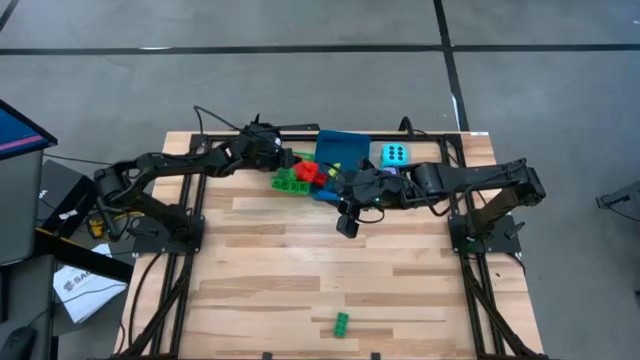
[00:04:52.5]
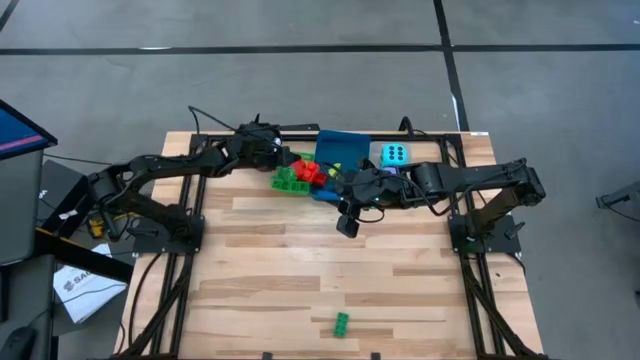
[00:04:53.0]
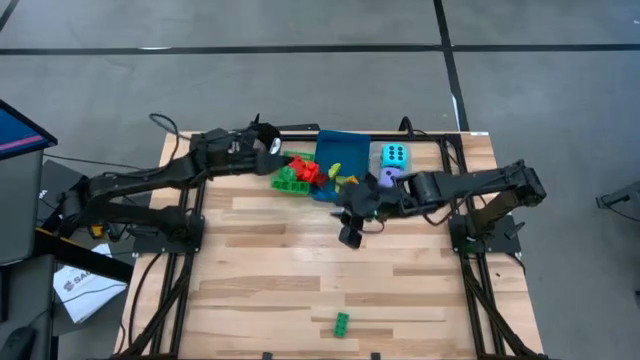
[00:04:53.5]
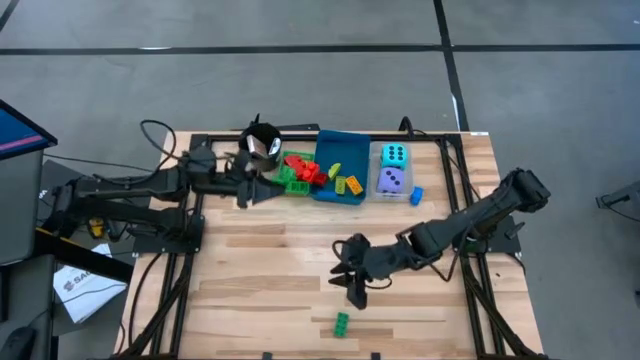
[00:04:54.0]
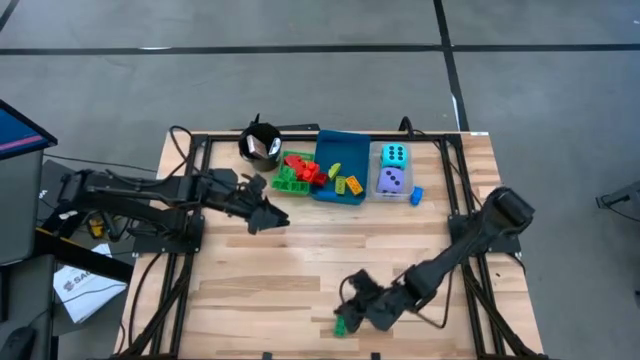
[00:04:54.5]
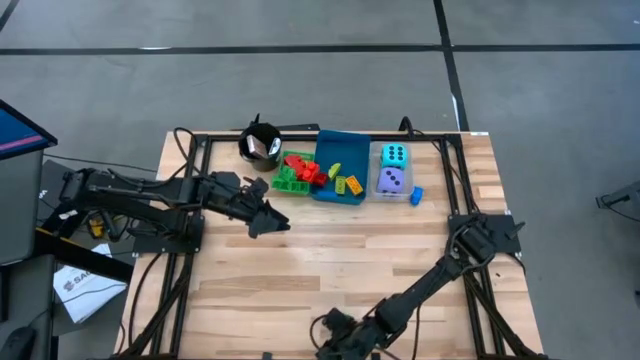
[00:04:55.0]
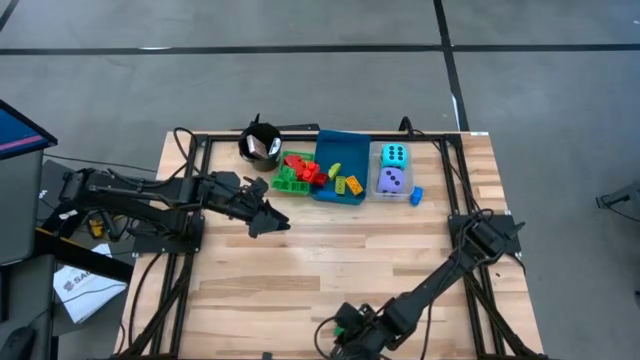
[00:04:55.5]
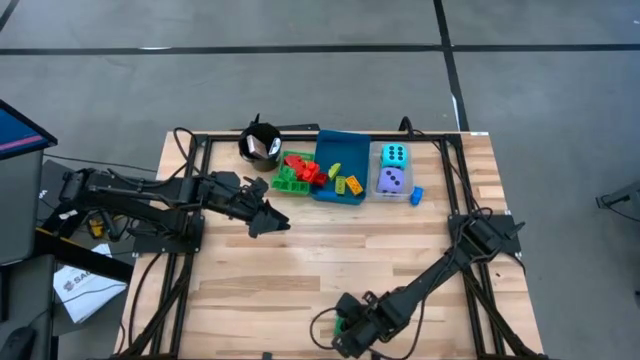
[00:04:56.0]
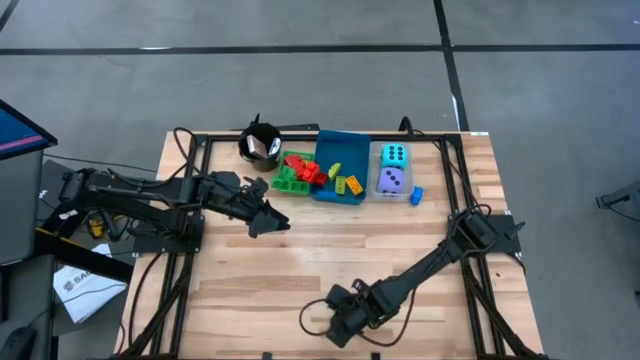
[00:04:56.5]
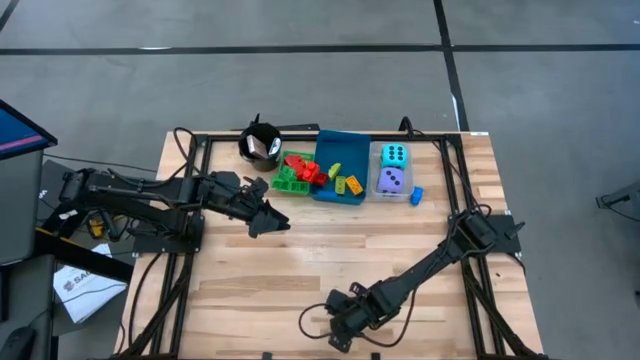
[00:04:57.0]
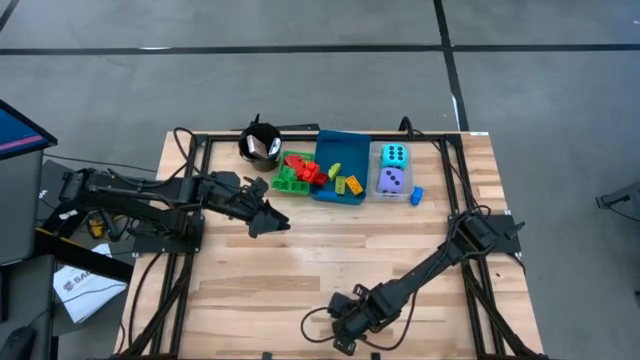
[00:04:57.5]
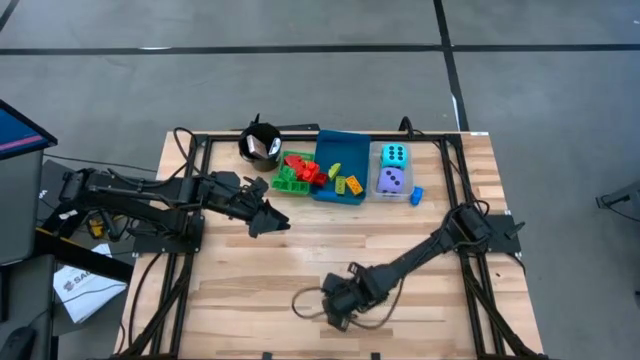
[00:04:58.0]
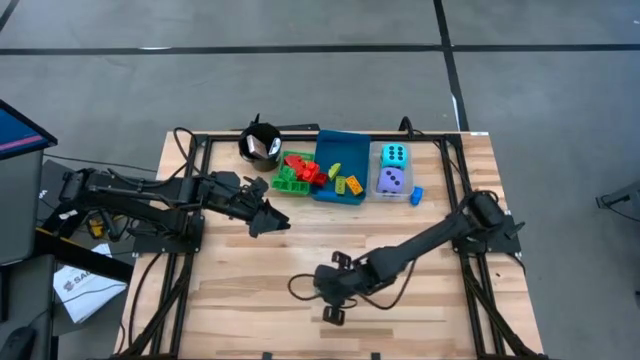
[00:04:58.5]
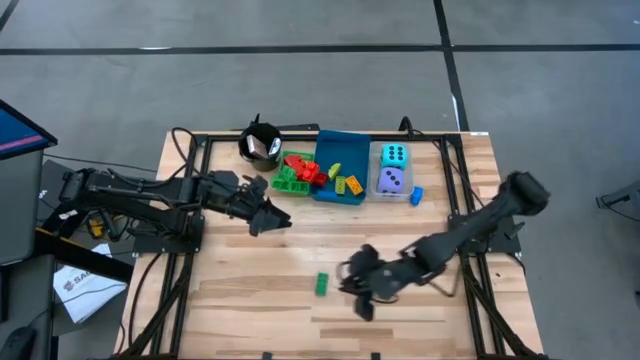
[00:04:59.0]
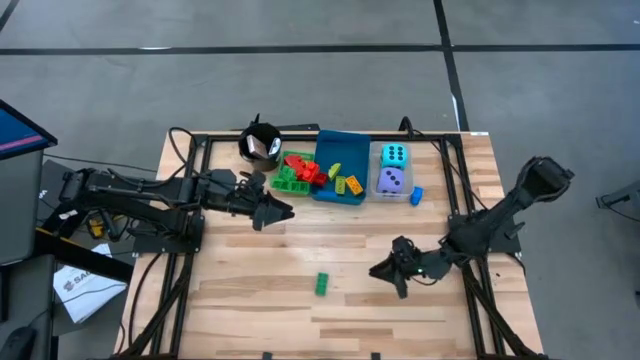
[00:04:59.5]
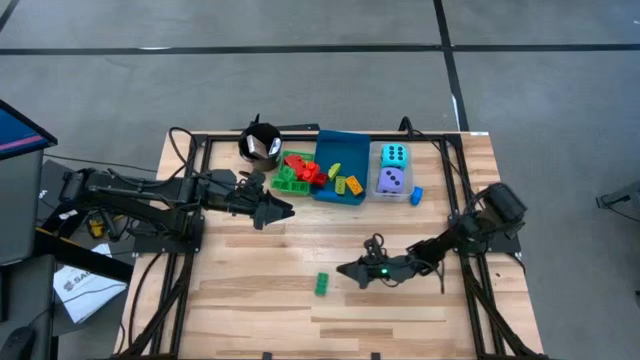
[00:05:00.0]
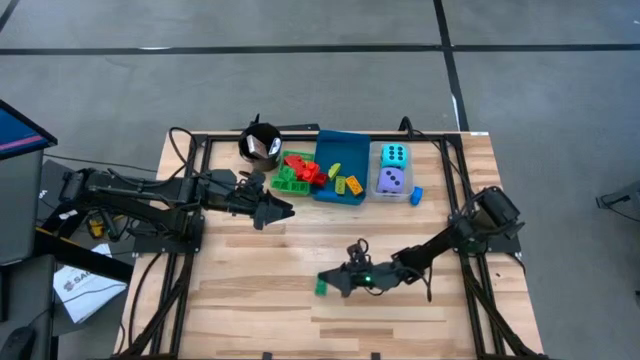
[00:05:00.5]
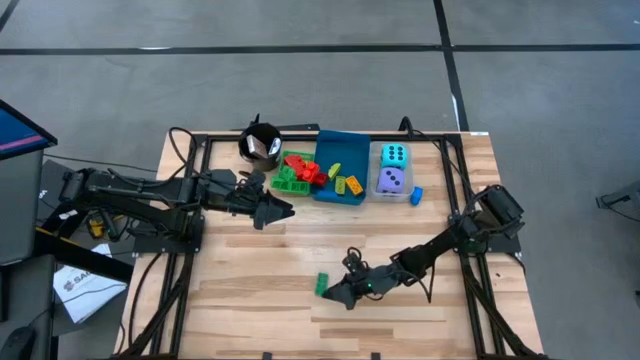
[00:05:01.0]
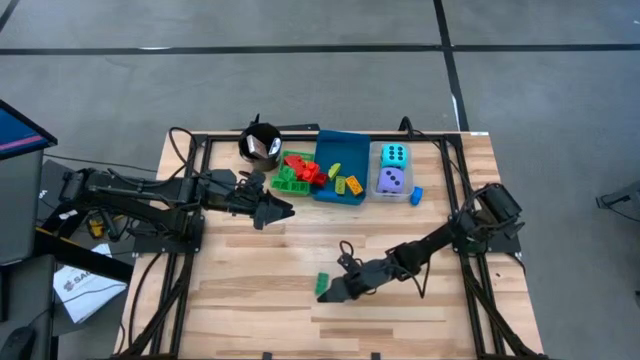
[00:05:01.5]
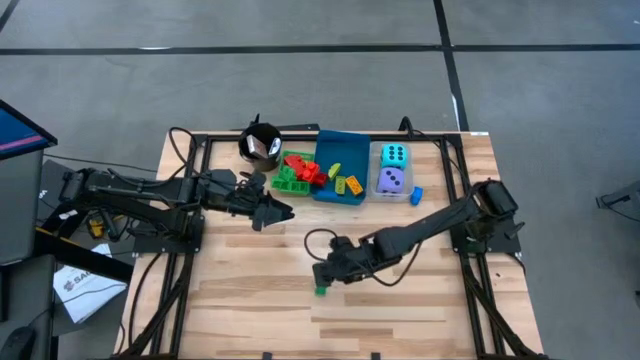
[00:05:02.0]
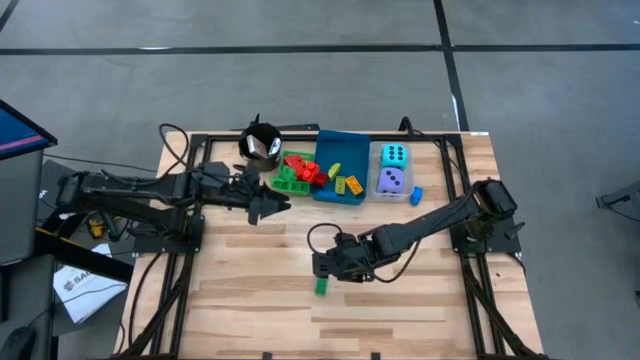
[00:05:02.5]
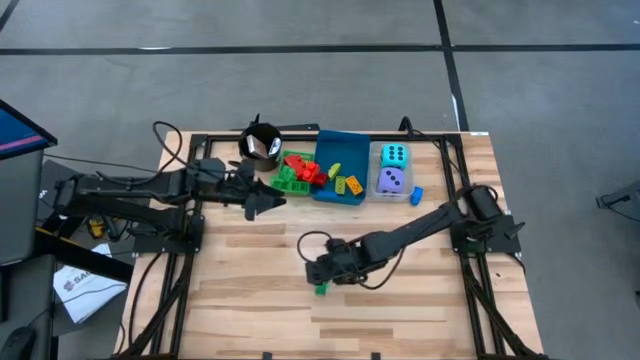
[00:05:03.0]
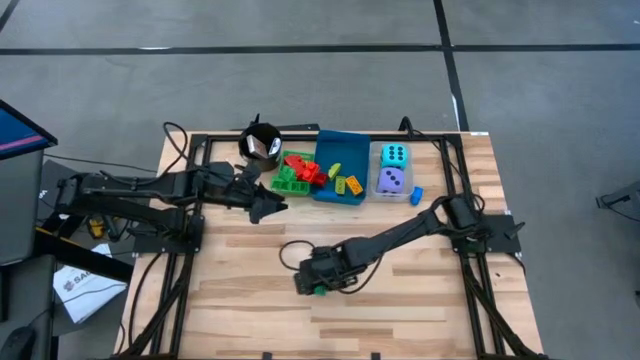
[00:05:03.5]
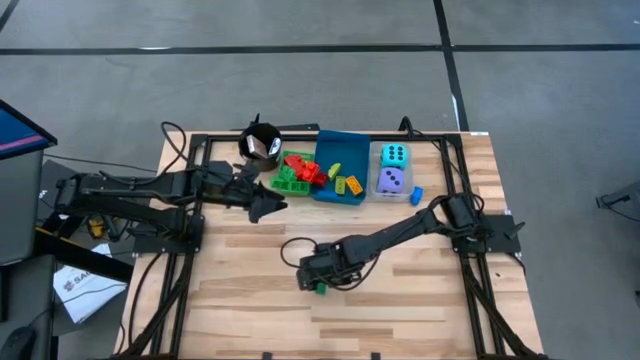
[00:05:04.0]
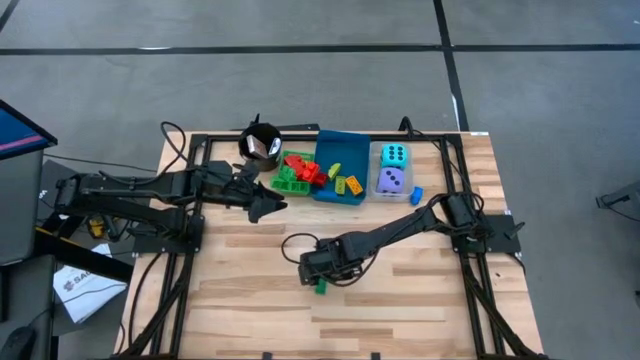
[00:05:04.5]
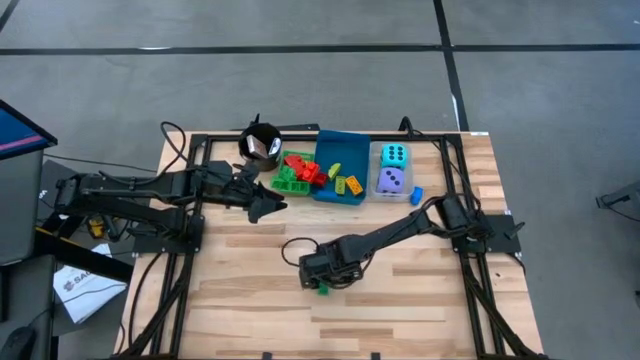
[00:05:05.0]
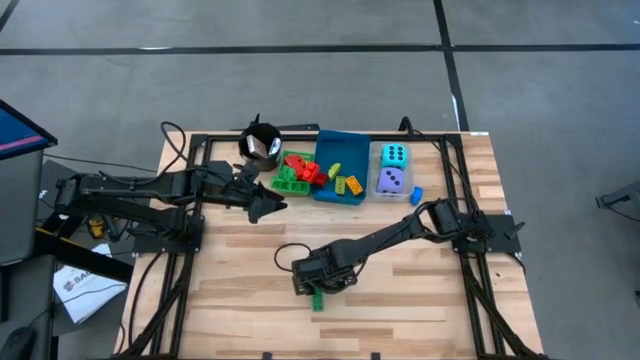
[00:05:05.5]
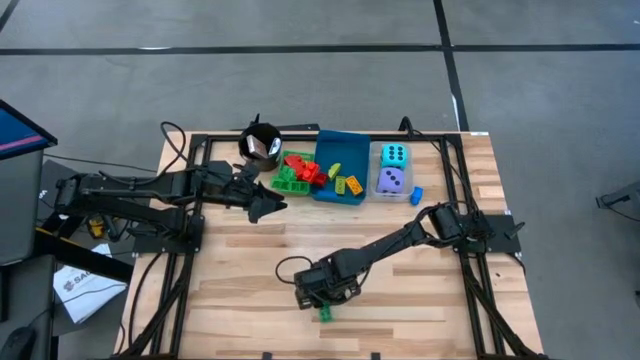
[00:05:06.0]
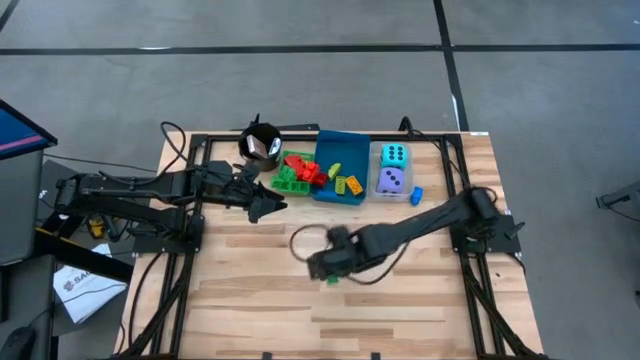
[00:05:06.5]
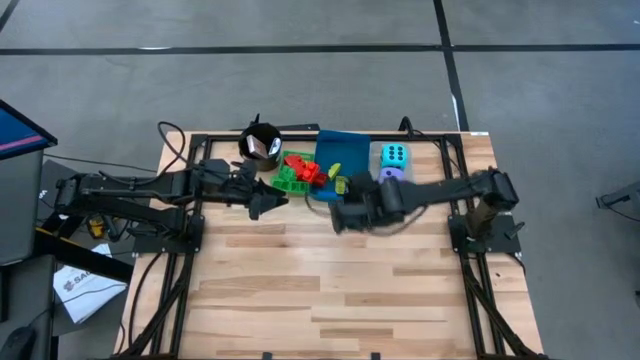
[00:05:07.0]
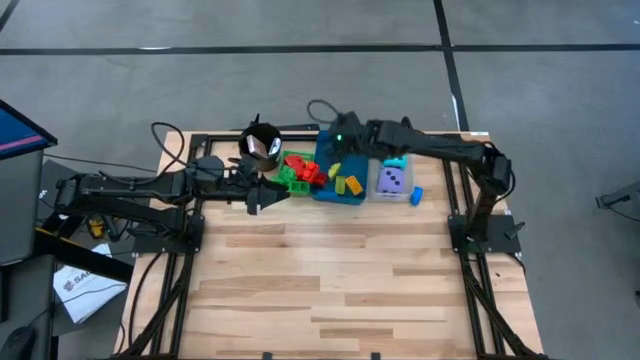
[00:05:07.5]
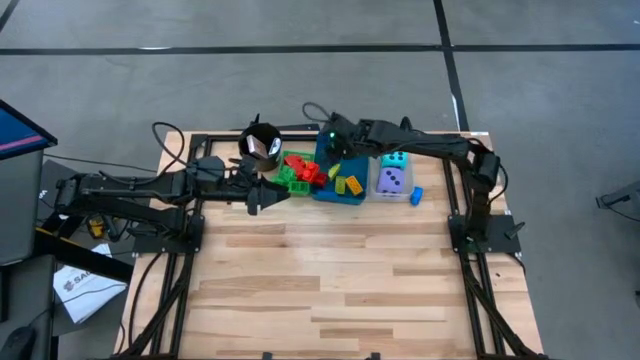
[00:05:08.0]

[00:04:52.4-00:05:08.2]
Task: Pick & Place Toys
Put the small stud green game piece into the blue bin
